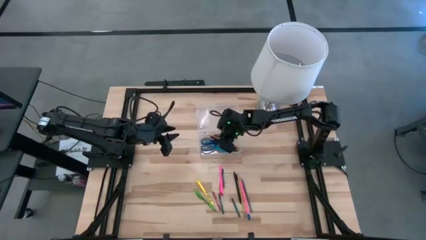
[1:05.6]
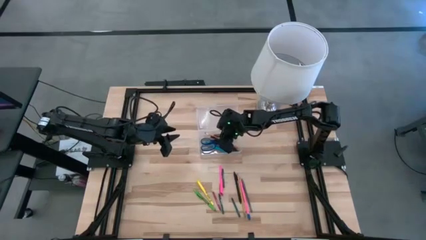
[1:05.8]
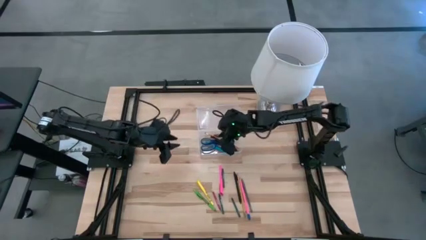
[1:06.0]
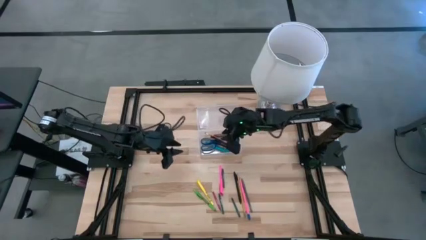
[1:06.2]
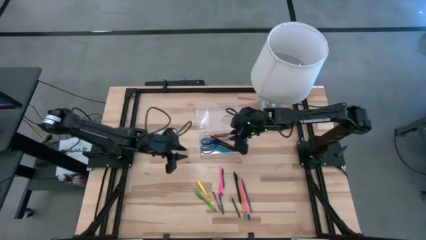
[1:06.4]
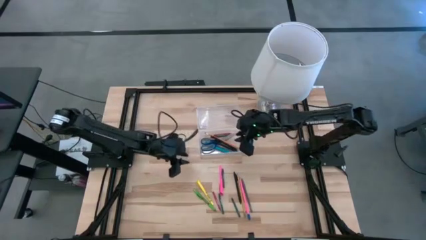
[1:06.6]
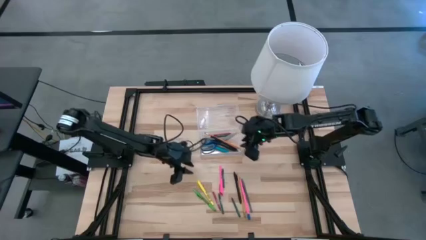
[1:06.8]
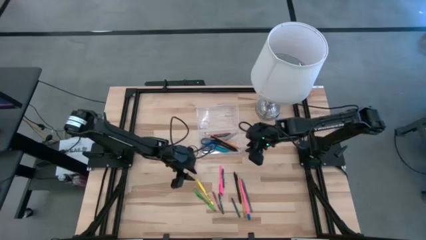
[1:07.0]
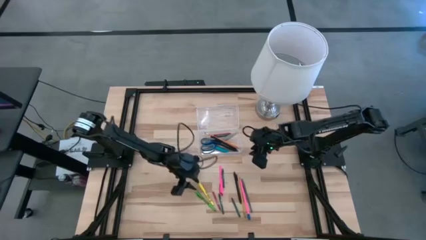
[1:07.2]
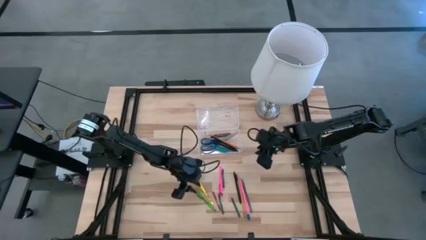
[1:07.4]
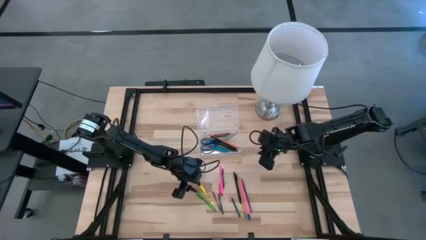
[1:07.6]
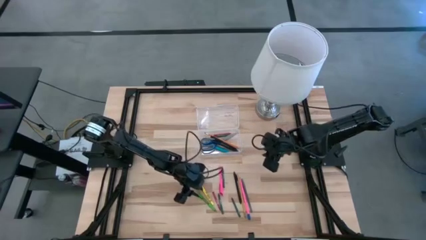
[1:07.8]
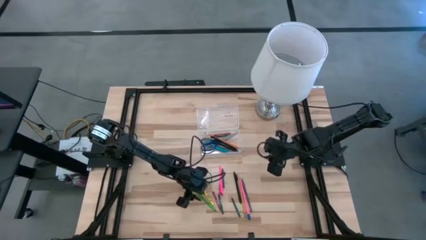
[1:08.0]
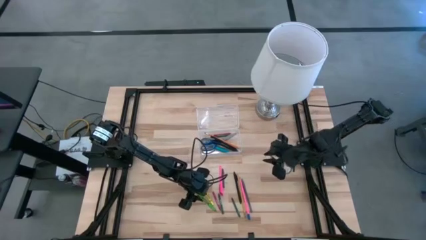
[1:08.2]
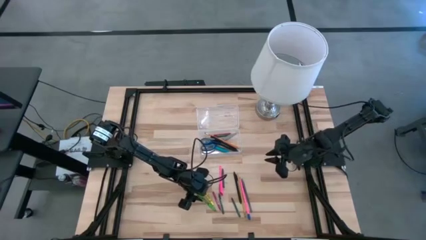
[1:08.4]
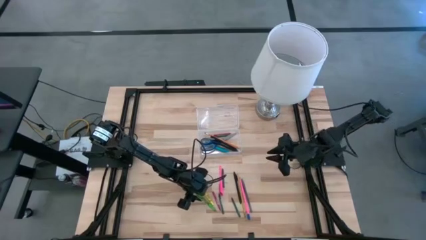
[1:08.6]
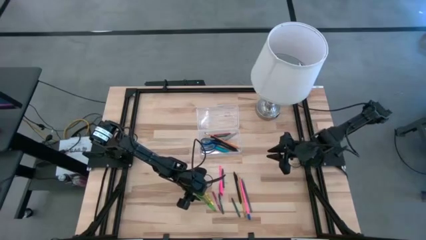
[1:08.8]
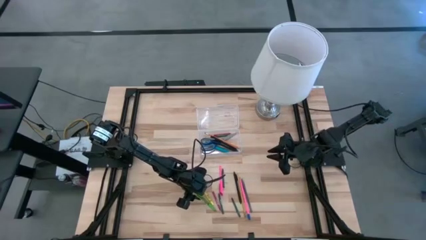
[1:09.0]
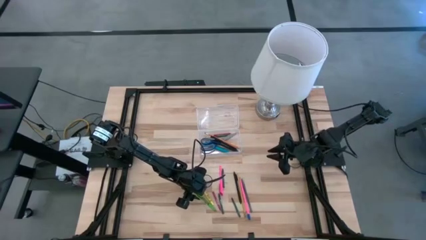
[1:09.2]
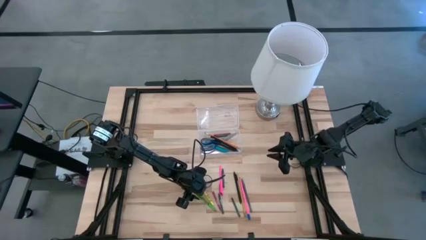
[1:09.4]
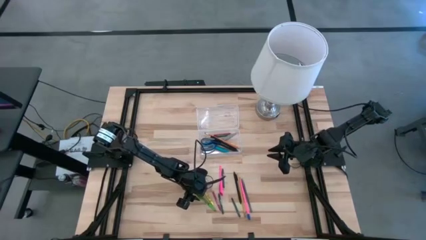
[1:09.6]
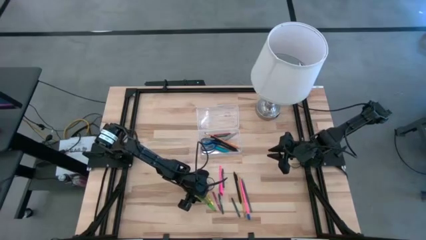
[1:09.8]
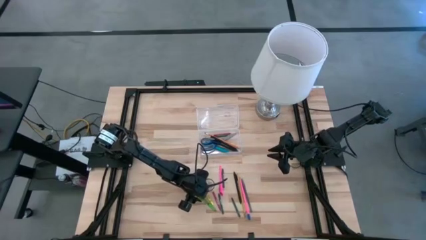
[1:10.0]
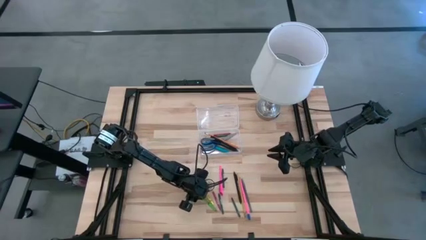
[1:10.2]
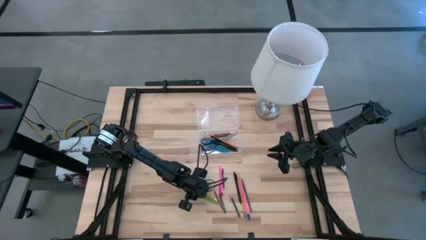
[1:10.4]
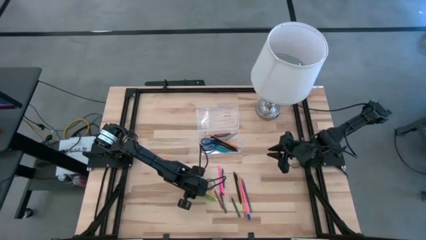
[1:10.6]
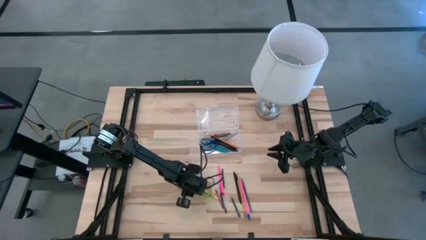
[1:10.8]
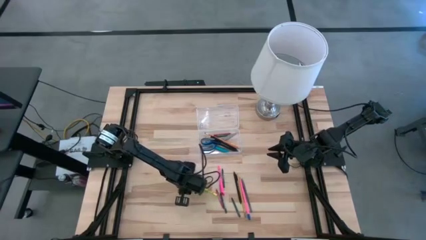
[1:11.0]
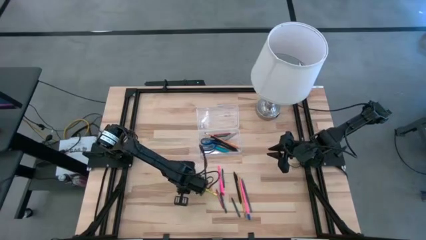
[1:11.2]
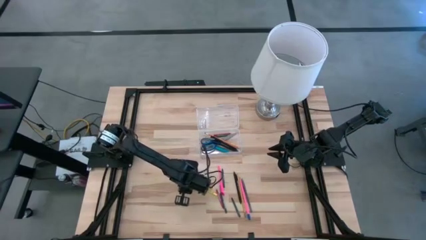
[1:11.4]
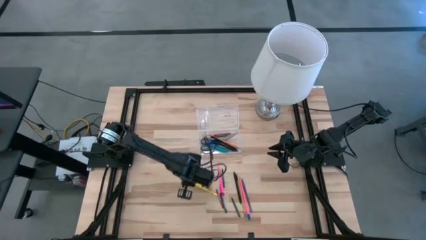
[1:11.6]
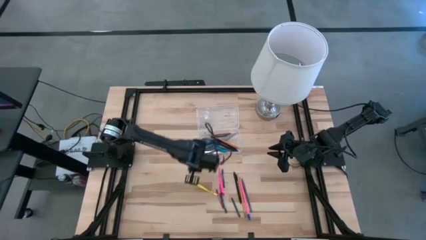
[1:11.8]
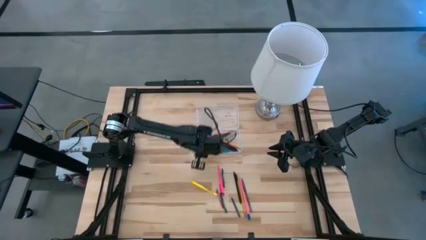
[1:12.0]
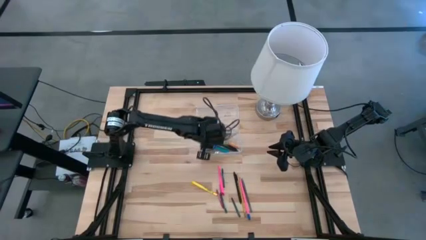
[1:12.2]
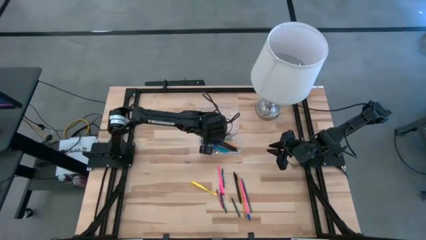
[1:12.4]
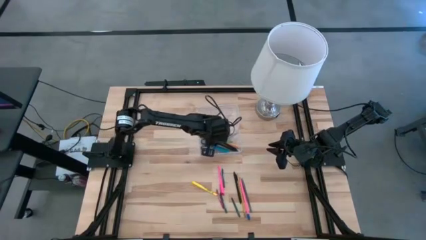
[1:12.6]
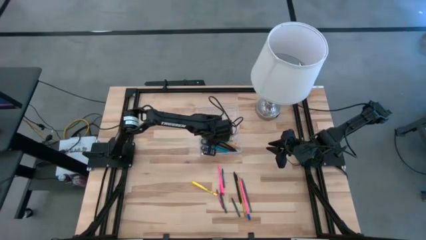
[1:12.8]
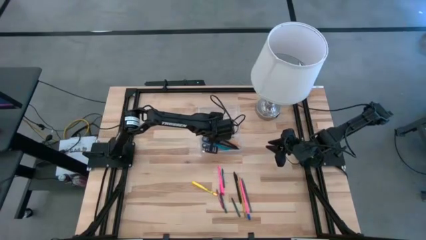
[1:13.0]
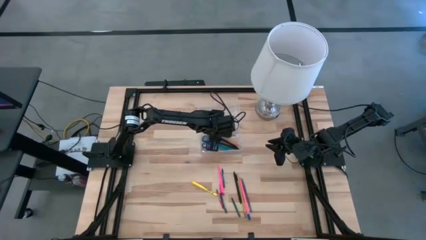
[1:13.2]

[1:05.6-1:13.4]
Task: Pick & place school supplies into a supply box
Put the green pen into the transparent supply box

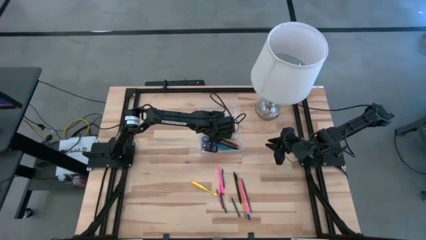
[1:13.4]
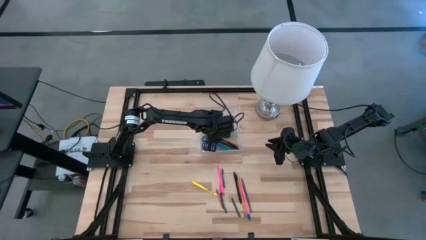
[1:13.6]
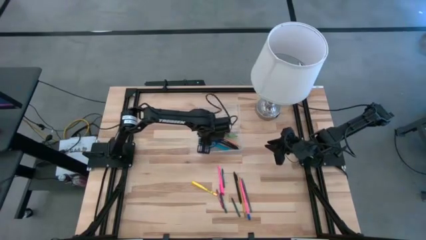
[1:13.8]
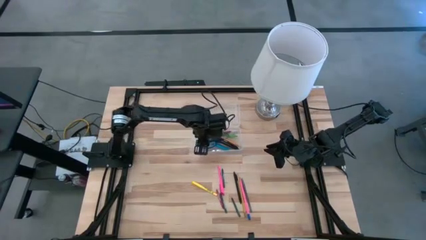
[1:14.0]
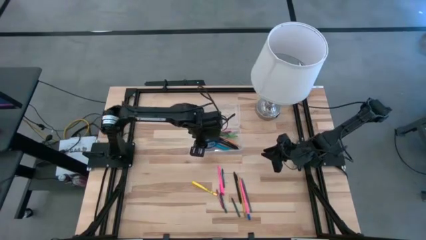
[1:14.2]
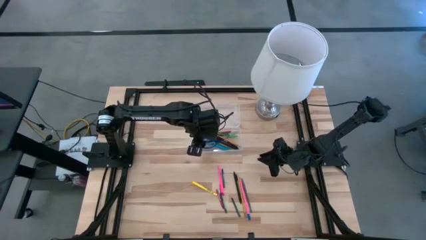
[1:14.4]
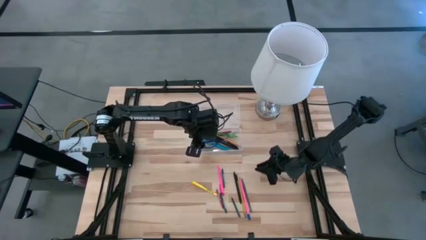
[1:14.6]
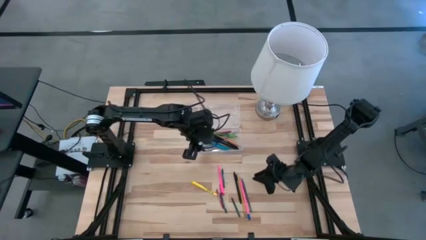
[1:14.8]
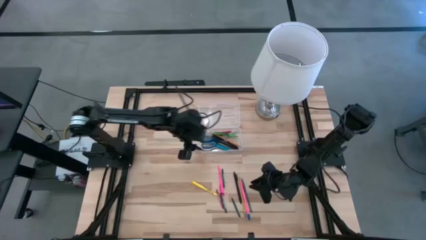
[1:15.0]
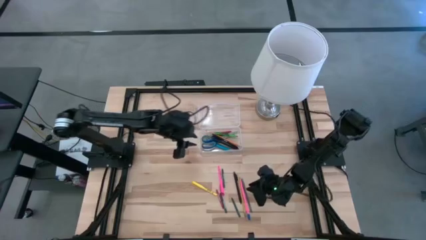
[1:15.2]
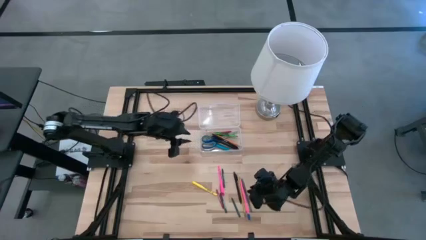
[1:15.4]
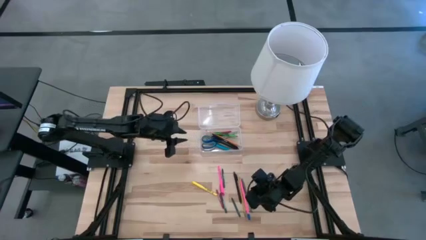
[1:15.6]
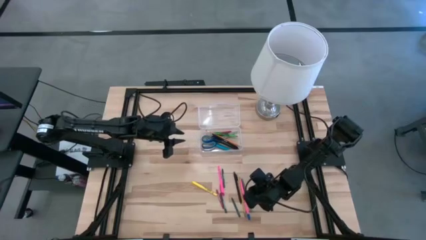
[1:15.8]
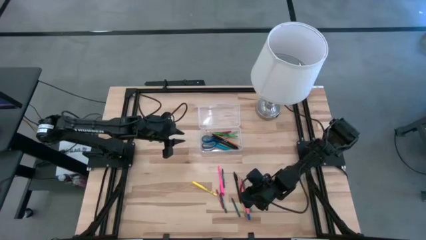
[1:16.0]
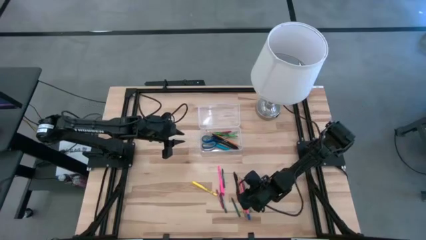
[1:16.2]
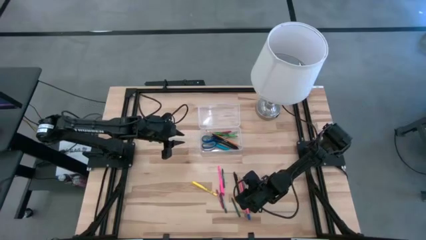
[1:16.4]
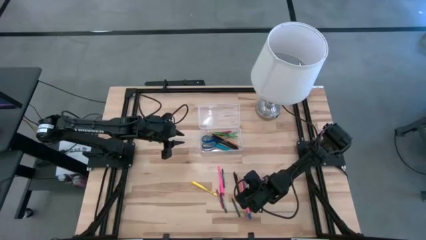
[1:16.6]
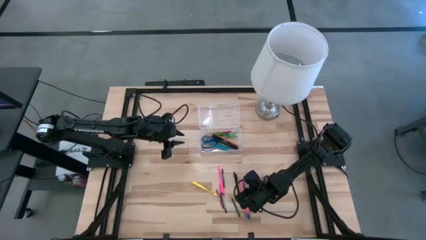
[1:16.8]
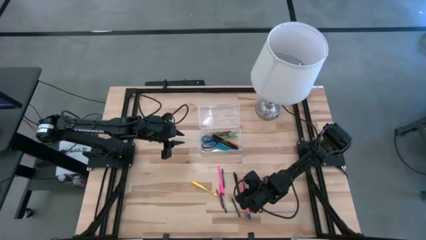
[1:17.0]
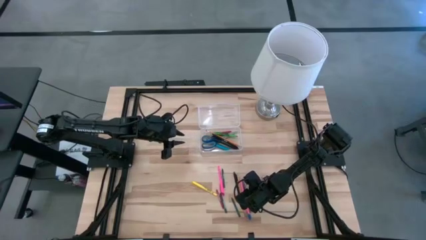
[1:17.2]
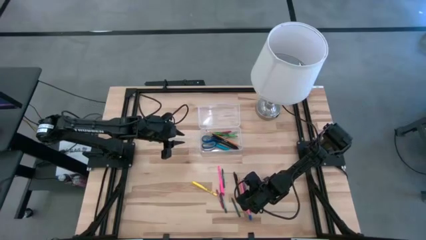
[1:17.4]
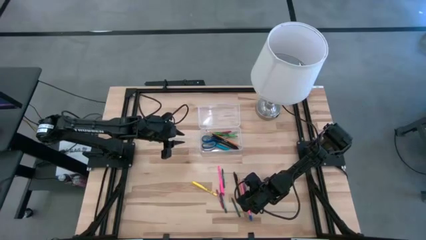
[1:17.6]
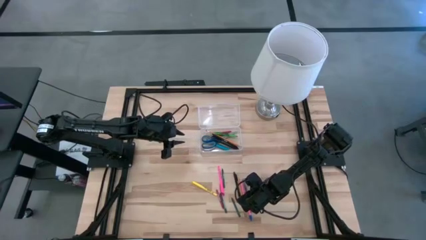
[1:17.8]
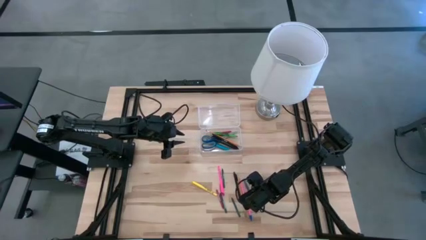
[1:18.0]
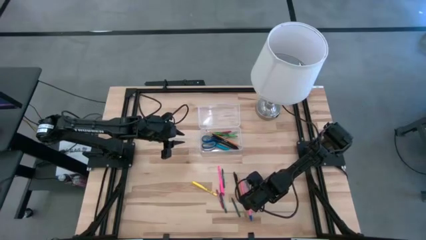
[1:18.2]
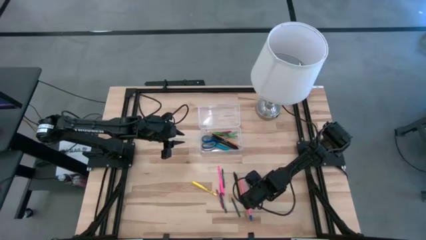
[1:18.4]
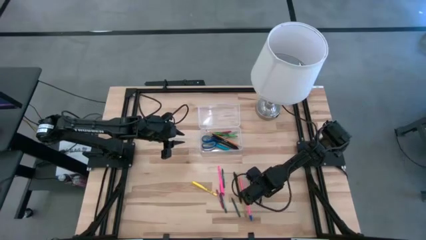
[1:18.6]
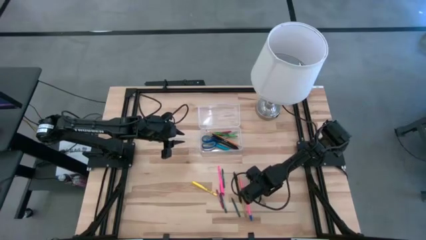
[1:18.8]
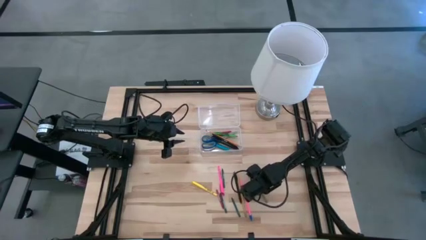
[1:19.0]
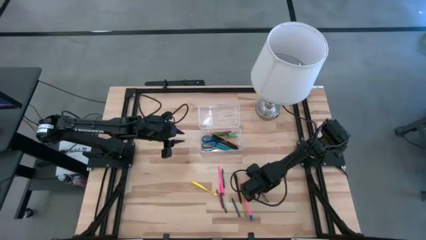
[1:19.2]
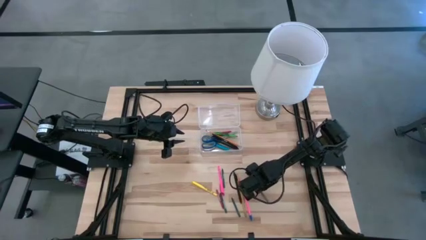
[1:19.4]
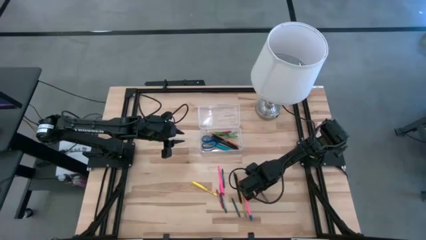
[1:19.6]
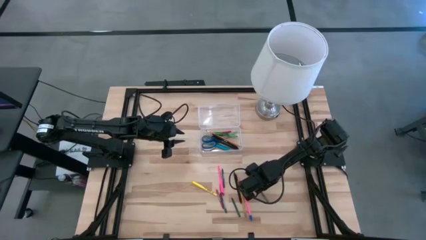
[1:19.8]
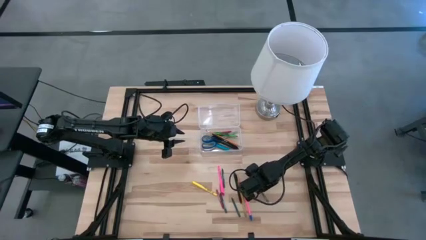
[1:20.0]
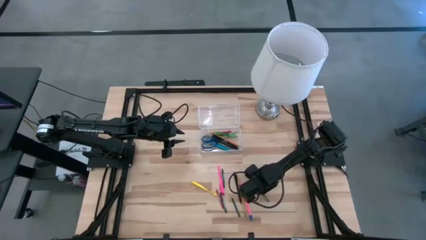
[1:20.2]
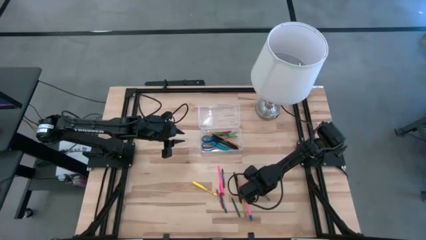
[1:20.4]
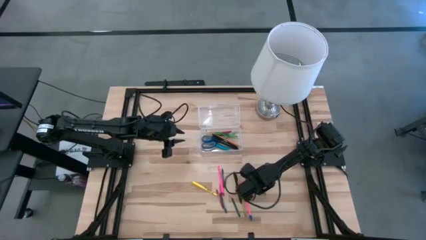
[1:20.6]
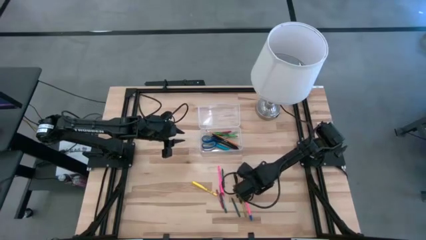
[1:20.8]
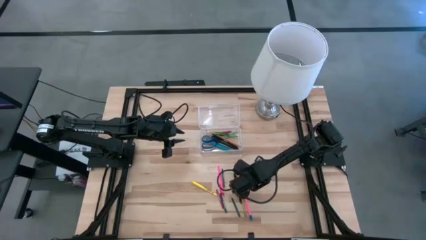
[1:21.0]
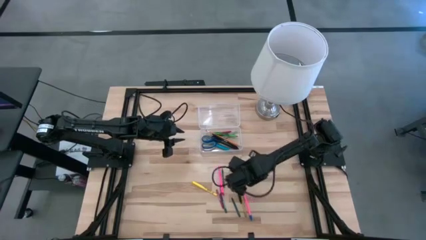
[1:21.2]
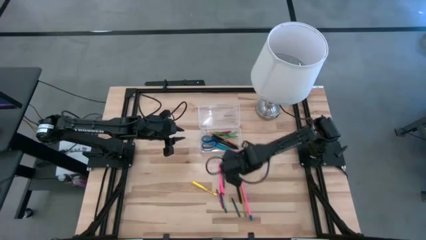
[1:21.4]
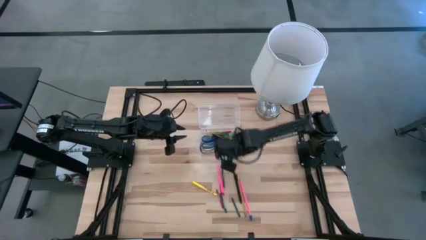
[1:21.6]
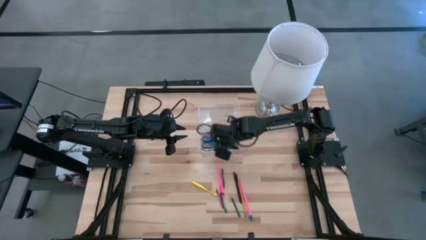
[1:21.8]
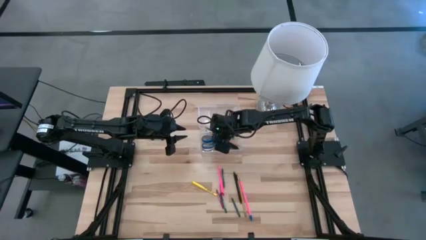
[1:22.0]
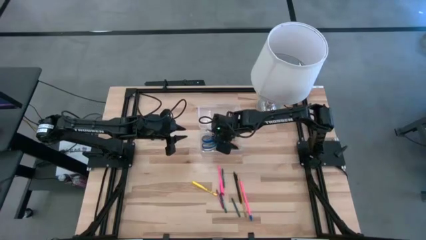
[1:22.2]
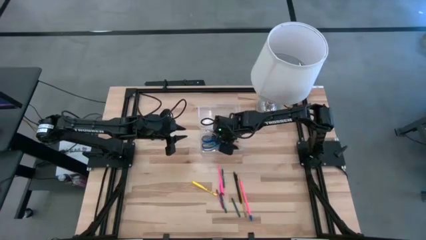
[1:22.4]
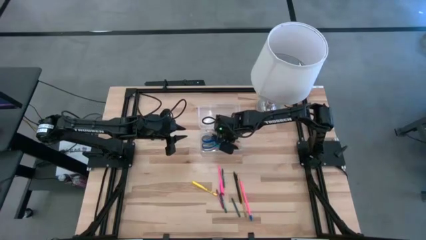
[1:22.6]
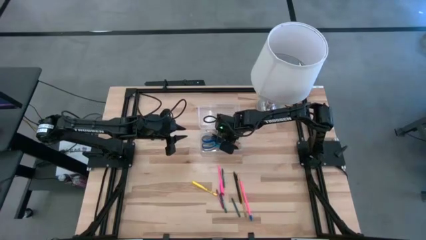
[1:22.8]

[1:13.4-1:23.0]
Put the gray pen into the transparent supply box
